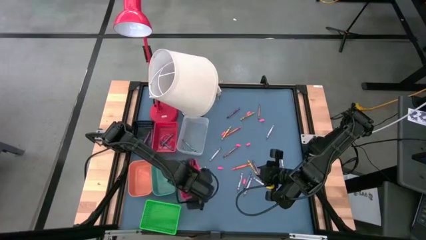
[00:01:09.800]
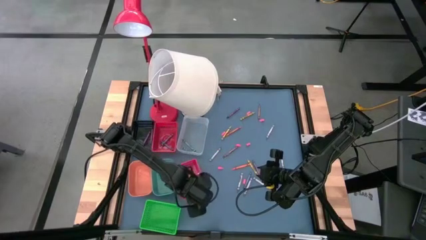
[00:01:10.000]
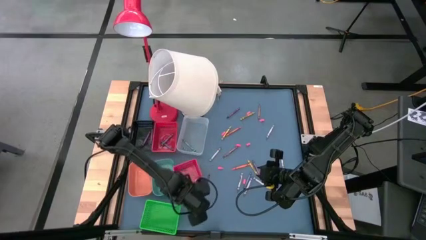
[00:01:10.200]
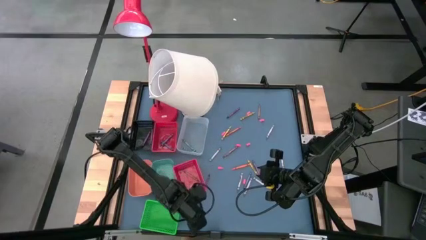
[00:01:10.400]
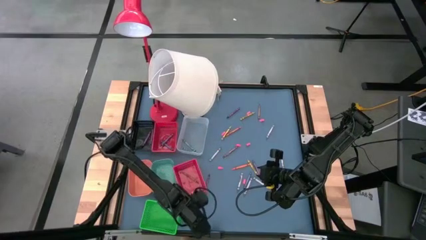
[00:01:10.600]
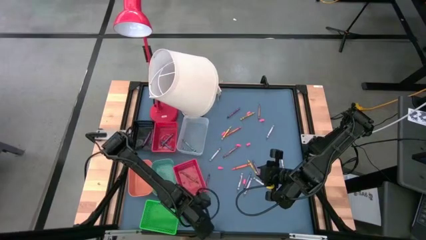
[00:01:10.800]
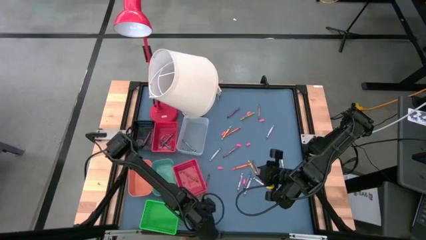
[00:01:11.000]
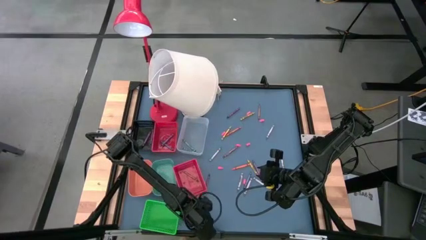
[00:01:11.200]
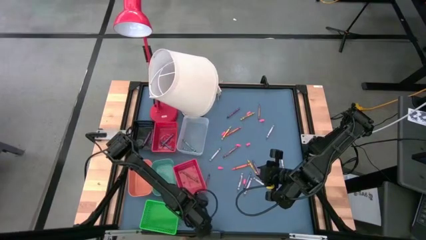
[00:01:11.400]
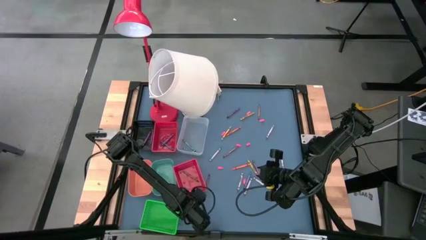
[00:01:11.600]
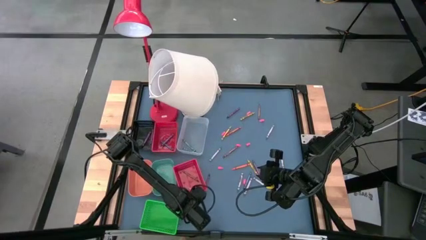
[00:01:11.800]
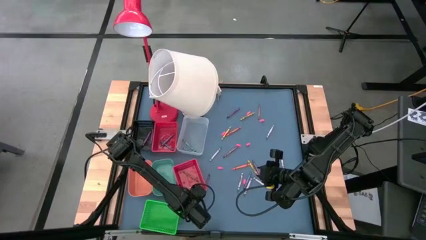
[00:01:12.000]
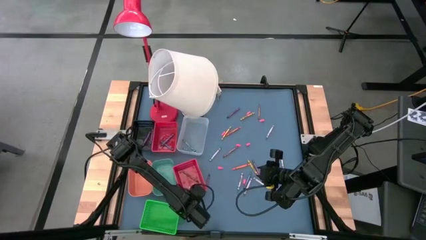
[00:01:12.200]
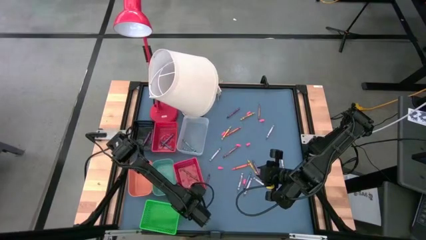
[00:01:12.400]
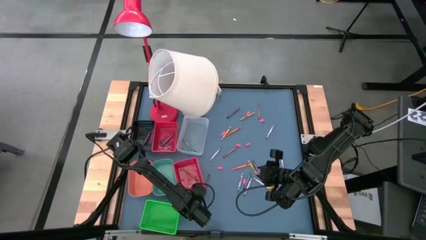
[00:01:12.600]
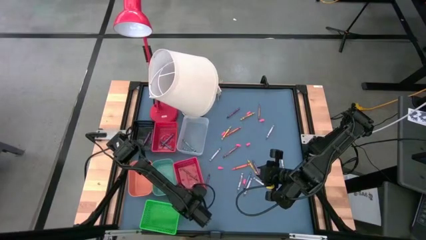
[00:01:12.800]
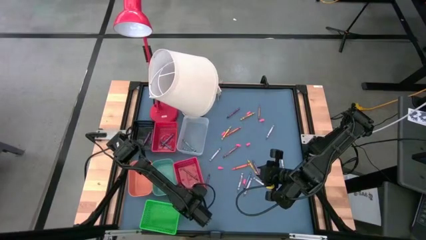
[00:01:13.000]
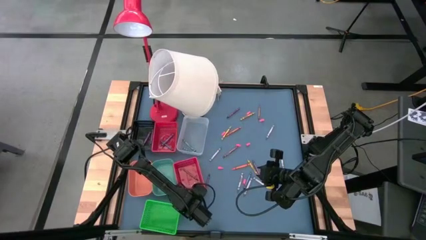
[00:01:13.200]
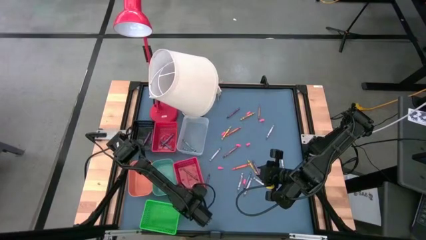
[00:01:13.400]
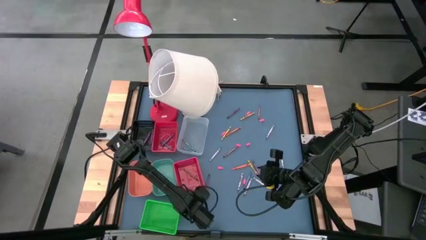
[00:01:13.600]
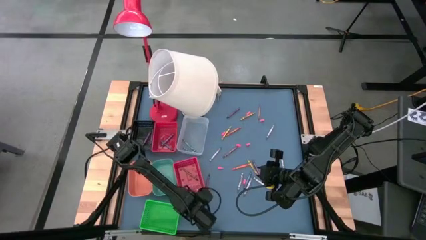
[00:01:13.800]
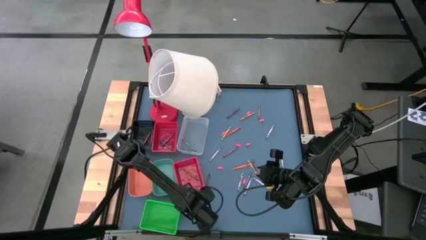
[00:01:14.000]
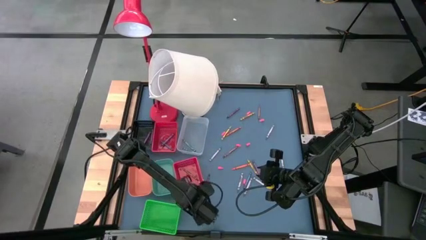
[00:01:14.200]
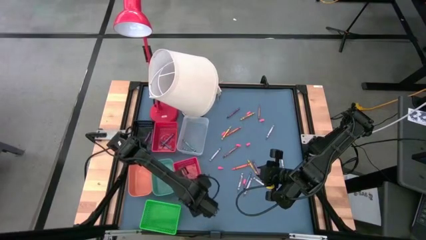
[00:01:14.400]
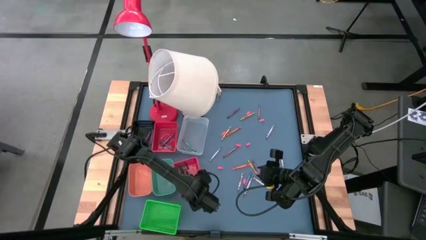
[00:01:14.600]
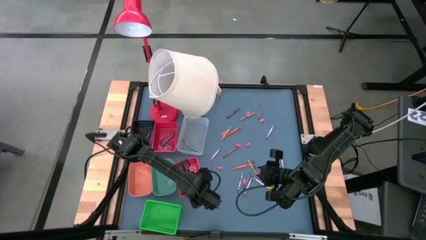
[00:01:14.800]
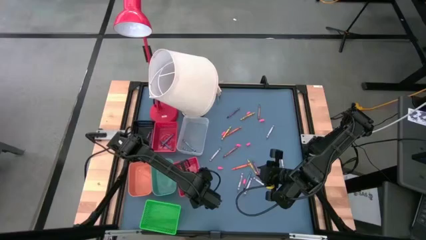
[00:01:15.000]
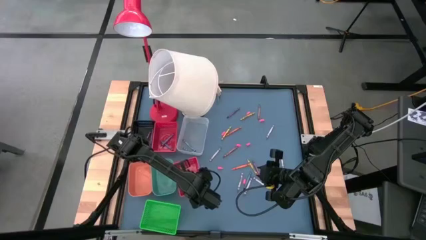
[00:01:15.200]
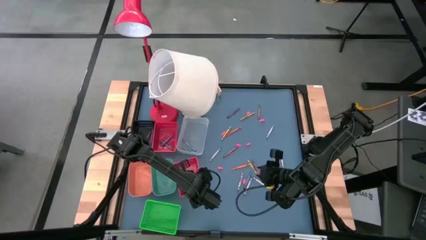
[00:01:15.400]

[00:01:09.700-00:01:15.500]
Task: Sort crayons
Put the brown crayon into the bottom red bin

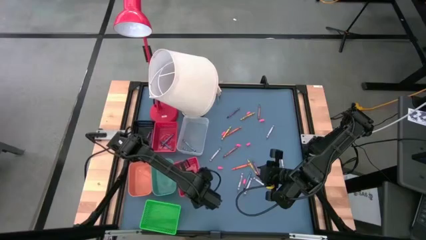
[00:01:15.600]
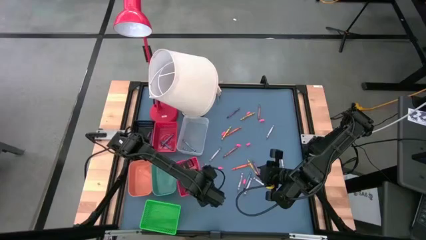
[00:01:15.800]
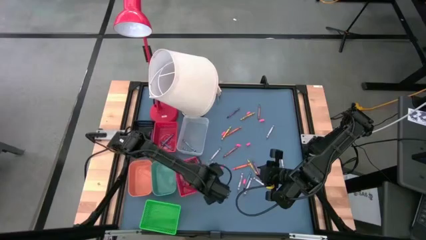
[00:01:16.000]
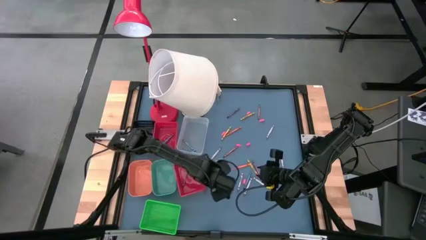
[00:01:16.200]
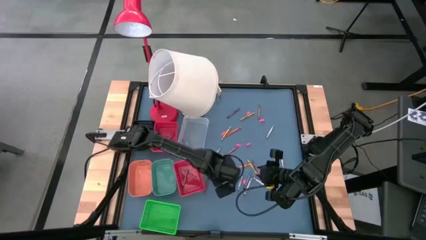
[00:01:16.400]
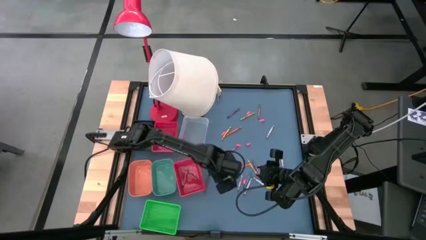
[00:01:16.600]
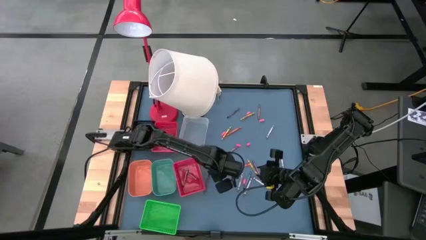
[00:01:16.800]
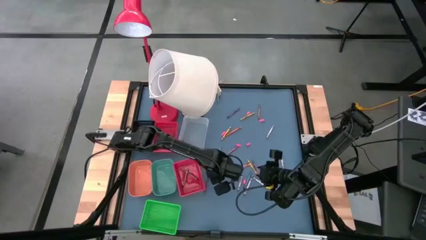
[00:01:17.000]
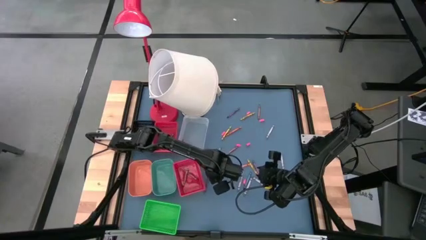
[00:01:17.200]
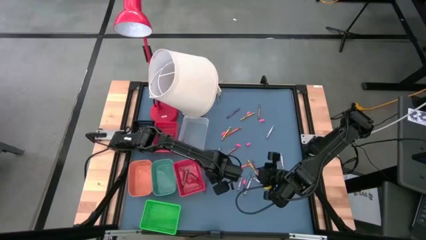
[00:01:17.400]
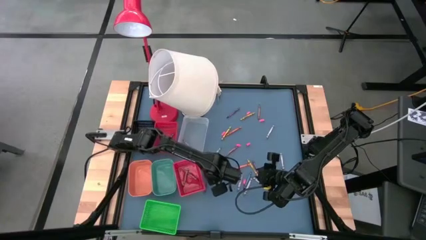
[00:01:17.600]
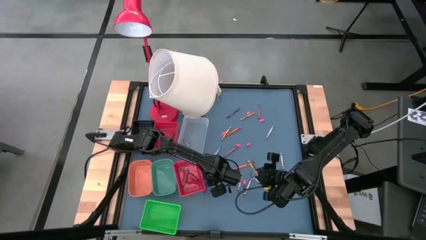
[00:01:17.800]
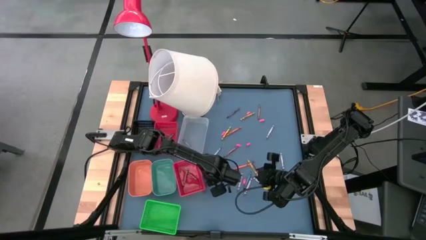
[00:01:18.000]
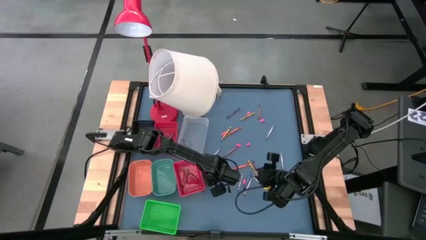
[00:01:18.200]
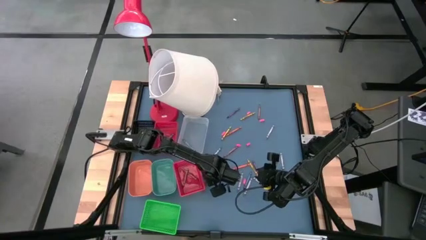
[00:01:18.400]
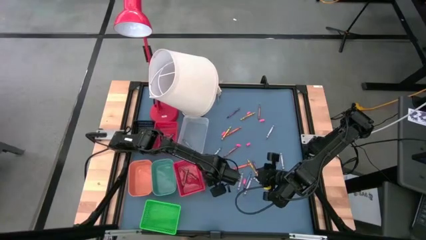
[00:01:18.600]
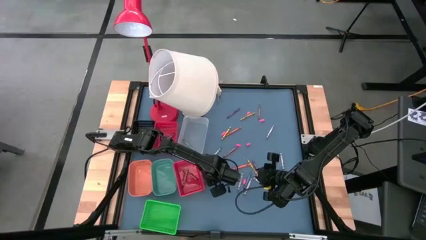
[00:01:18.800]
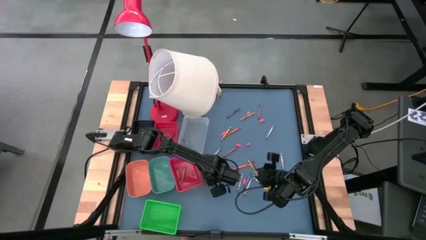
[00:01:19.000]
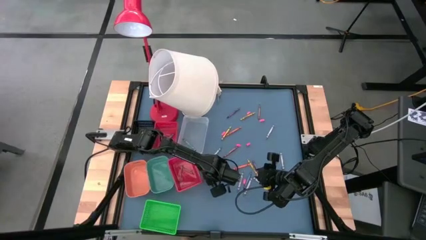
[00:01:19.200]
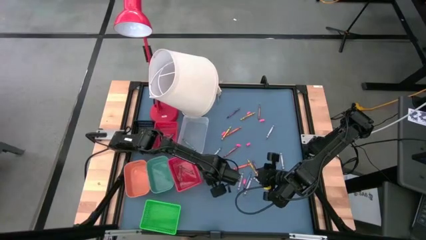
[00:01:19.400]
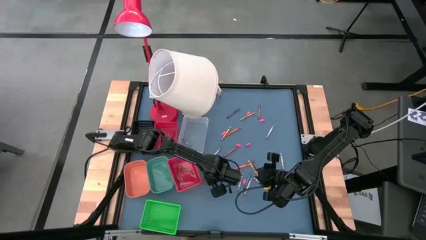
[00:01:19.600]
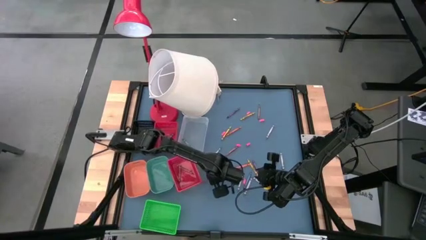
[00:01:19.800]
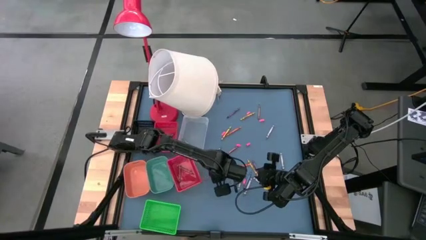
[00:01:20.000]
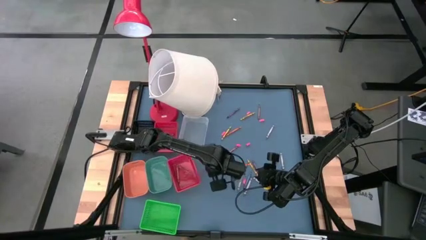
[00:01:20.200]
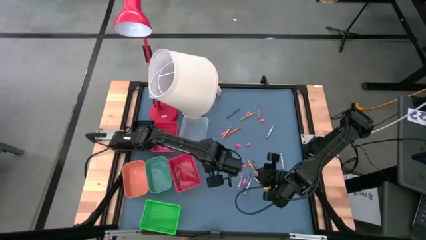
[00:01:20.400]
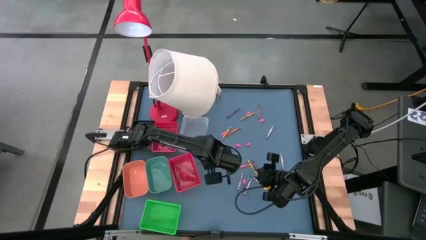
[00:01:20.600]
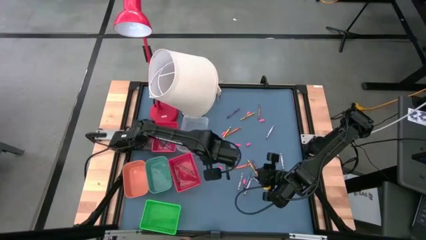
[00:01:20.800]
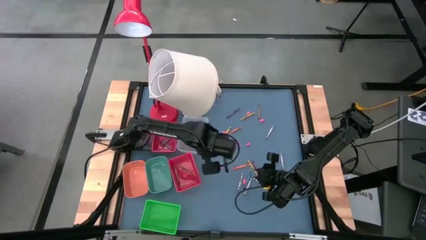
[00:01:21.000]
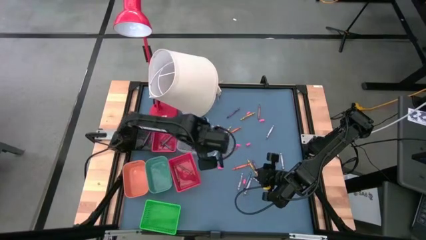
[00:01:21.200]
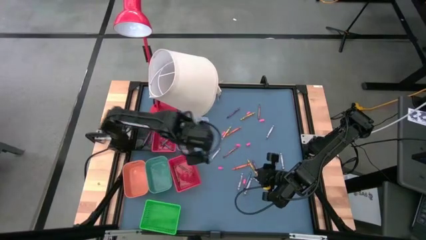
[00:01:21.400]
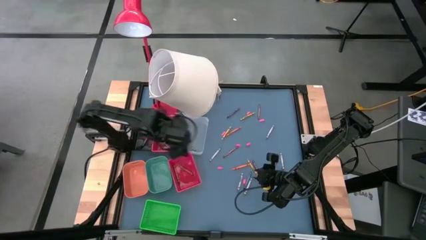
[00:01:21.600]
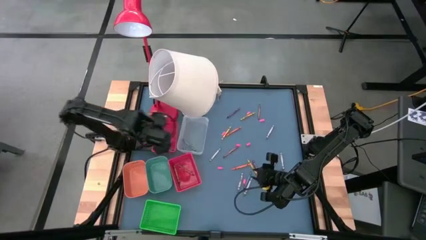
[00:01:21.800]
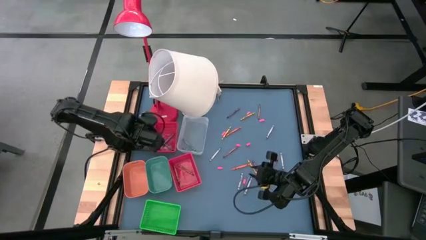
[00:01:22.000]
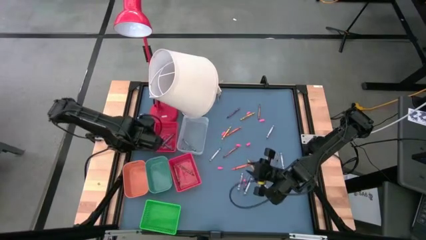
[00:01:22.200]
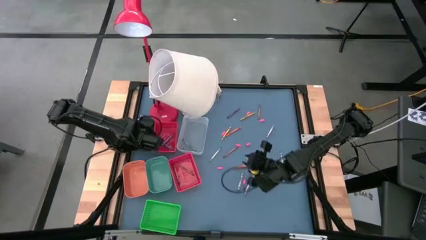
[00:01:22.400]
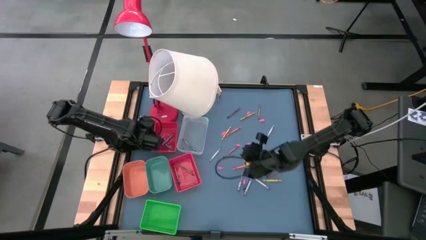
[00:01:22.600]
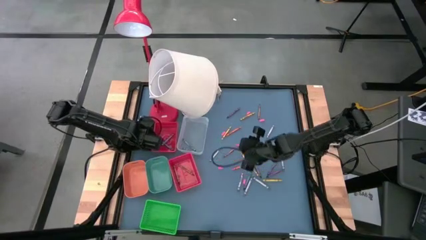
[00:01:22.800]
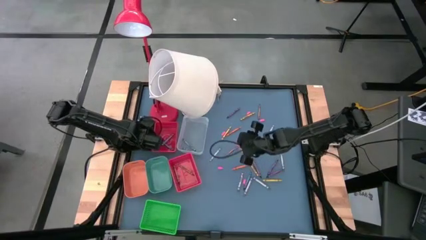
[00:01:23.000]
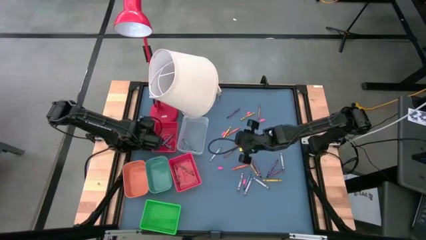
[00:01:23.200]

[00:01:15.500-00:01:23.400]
Put the violet crayon into the black bin
